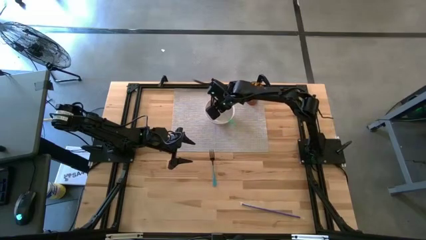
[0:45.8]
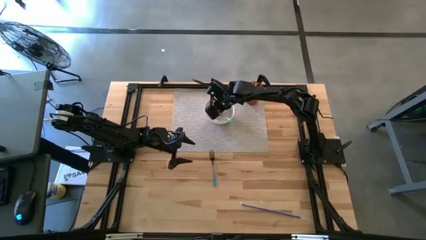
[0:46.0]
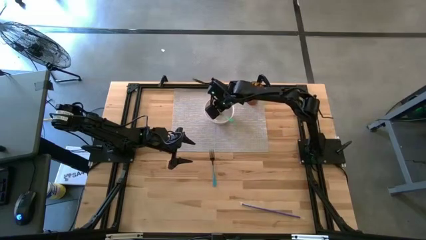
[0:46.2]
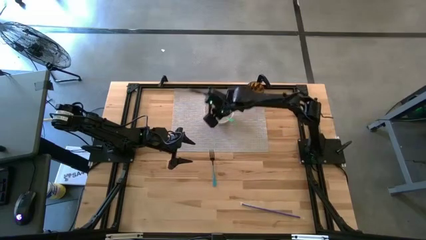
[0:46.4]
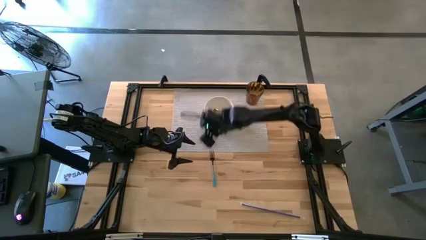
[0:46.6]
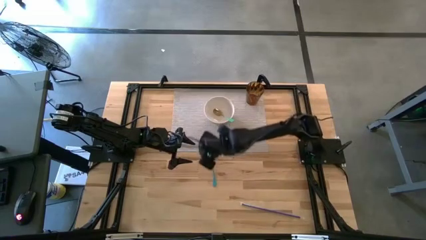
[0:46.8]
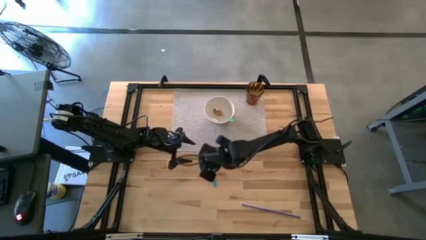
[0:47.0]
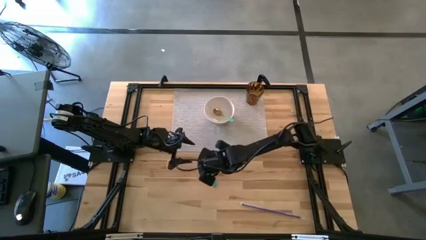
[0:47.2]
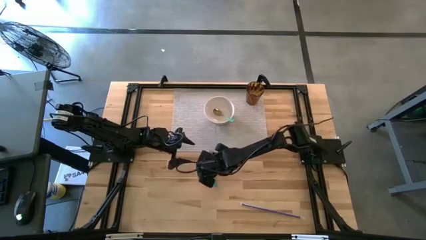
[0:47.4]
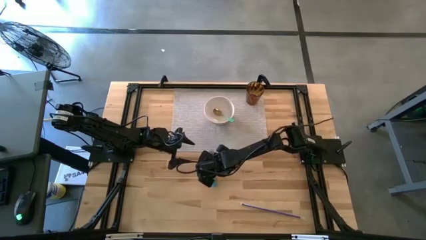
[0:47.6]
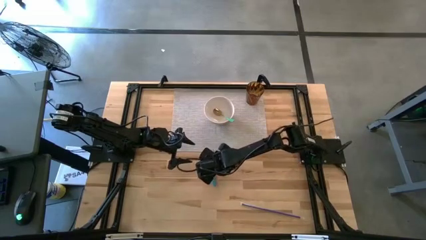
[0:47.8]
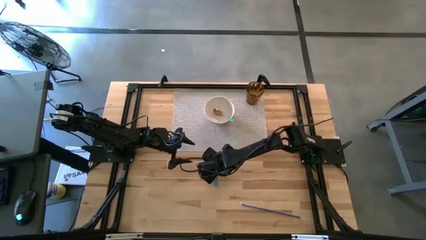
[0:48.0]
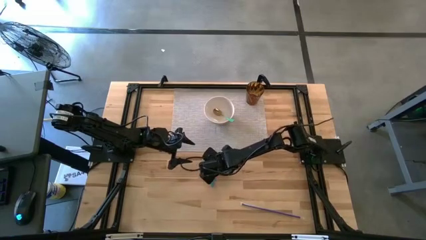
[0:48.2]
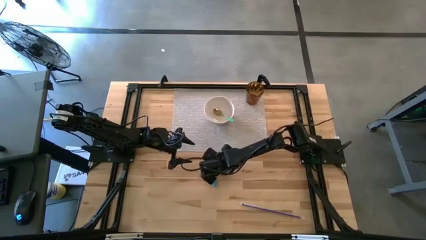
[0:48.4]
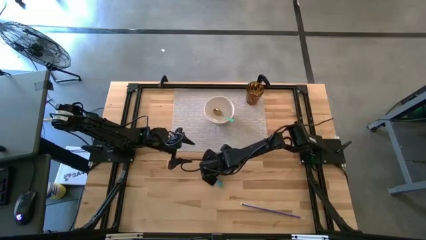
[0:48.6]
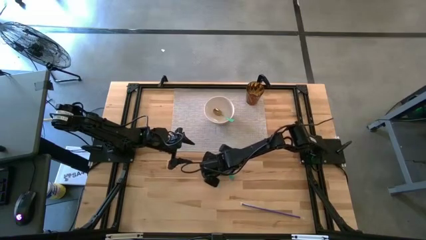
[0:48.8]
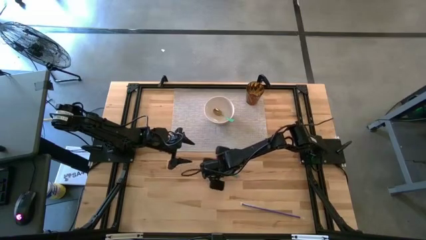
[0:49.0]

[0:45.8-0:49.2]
Task: Pick & Place Utensil
Put the blue fork into the white bowl on the gray mat

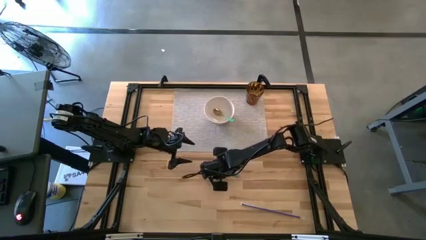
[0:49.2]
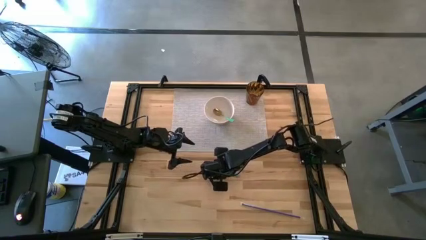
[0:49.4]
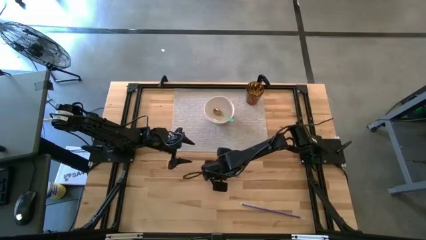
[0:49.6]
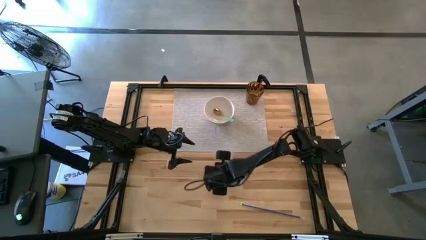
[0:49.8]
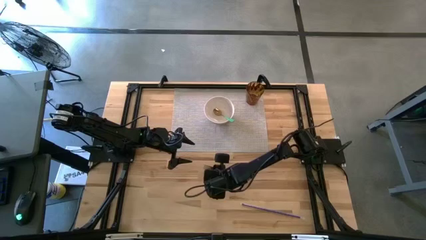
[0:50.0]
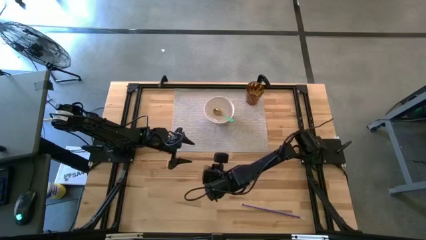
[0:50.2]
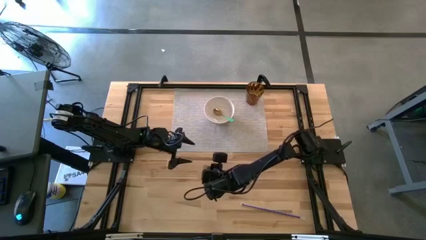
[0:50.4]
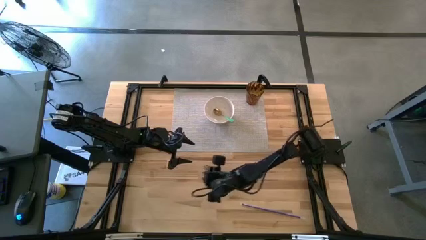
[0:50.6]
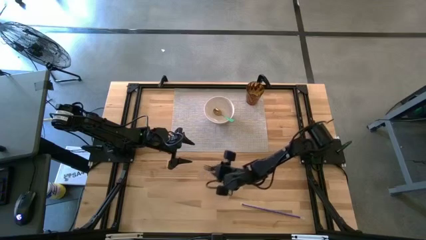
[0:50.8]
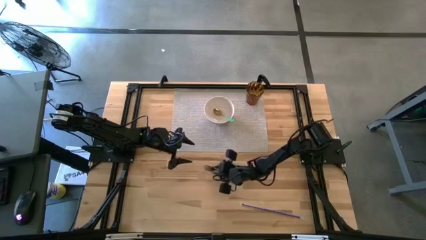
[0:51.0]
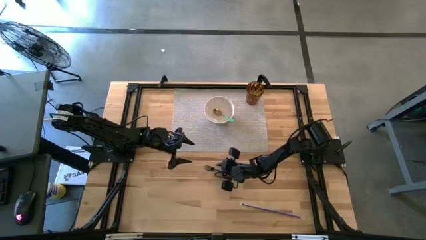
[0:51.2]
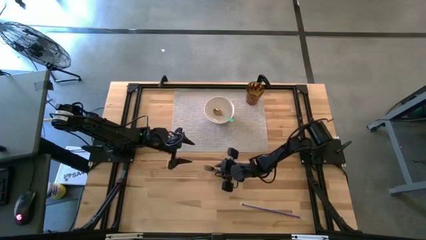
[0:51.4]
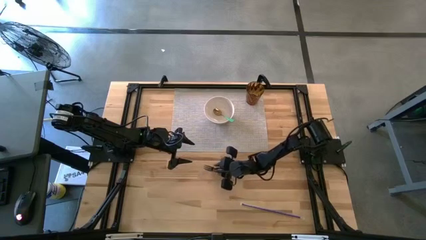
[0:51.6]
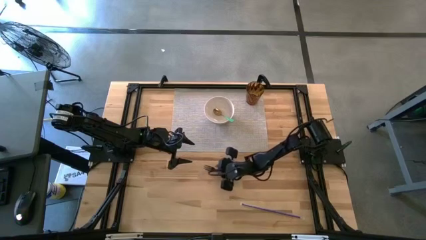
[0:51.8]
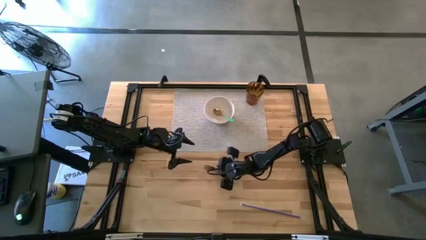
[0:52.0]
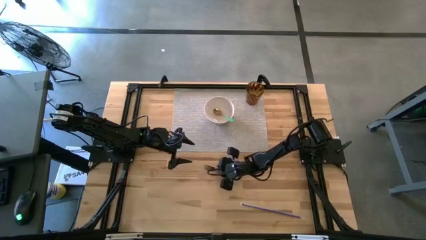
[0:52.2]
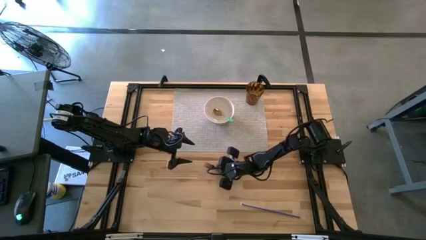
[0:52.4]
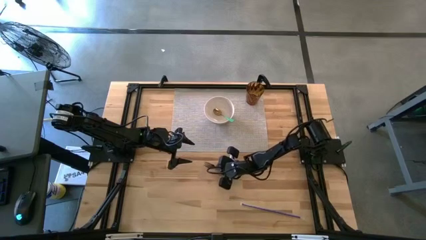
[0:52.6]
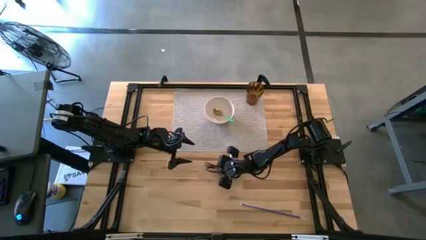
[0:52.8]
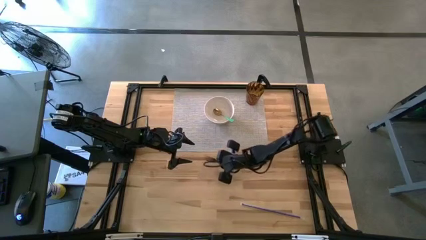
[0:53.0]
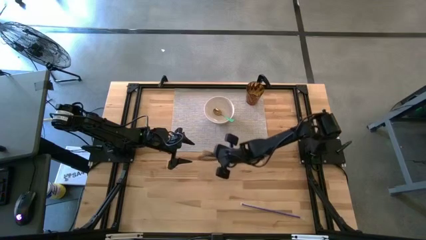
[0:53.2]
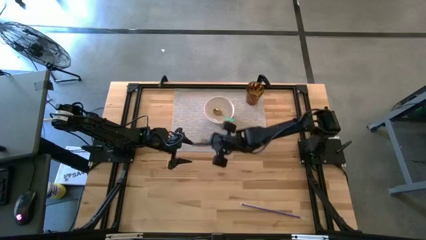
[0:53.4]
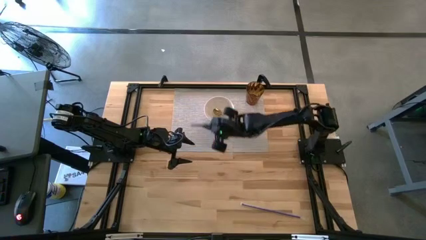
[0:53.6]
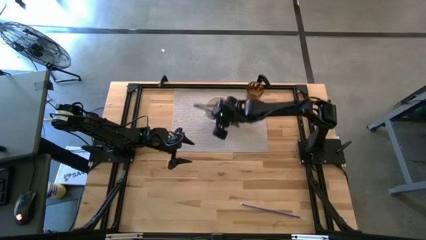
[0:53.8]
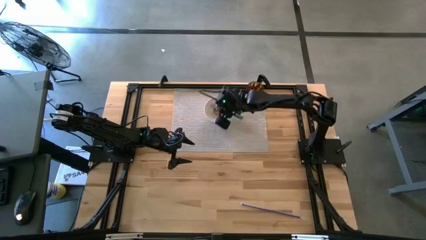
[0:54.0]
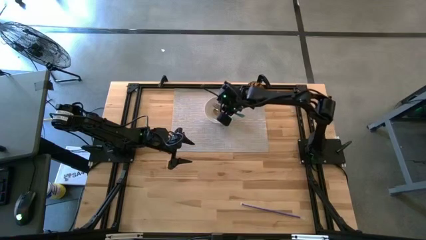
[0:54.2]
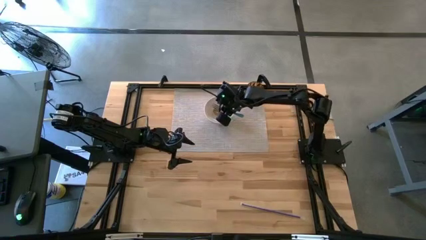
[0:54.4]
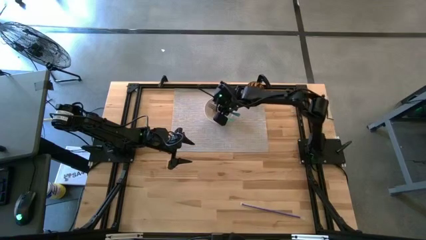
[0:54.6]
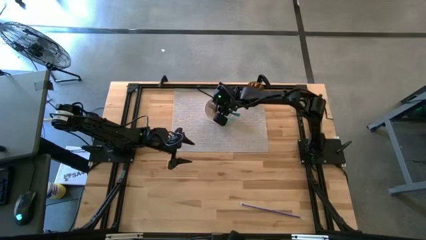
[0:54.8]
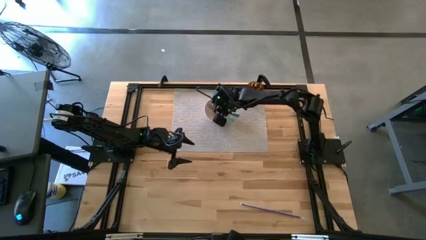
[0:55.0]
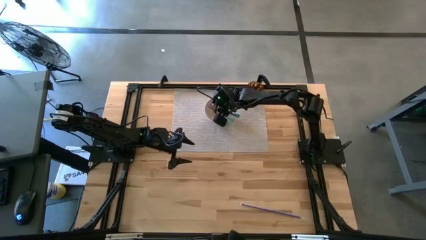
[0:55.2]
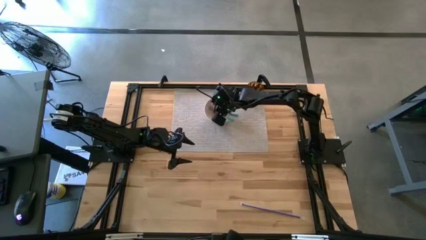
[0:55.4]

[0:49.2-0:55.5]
Put the blue fork into the white bowl on the gray mat

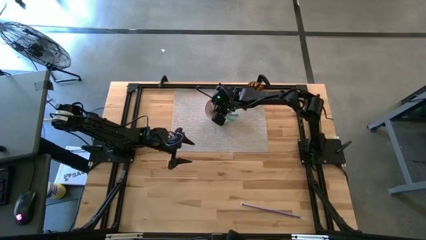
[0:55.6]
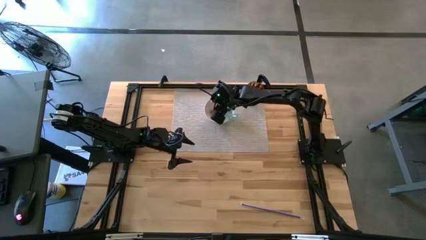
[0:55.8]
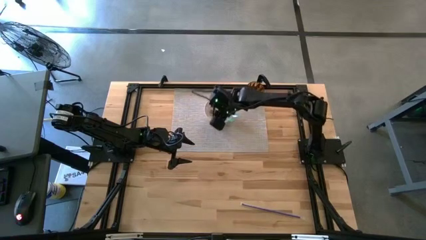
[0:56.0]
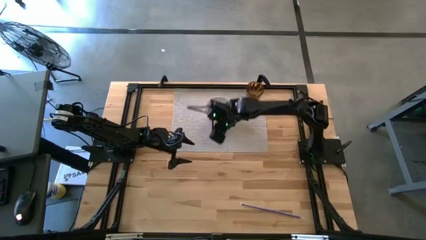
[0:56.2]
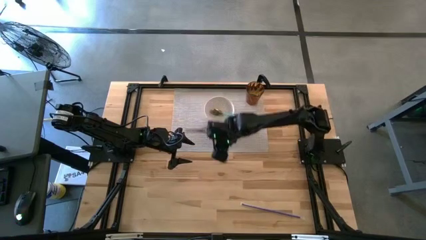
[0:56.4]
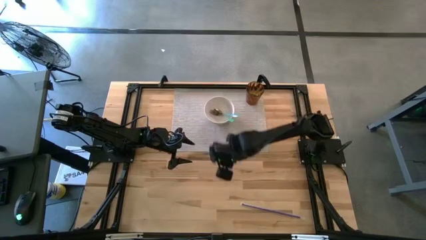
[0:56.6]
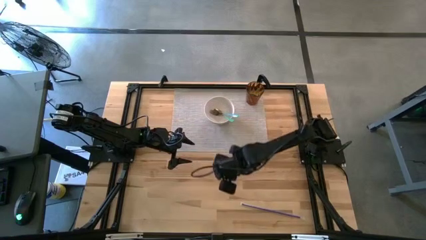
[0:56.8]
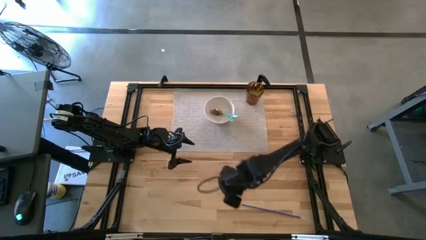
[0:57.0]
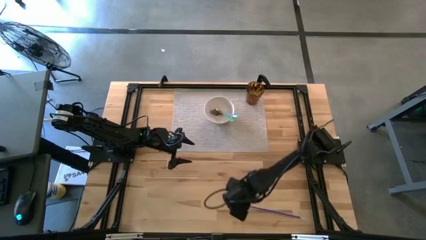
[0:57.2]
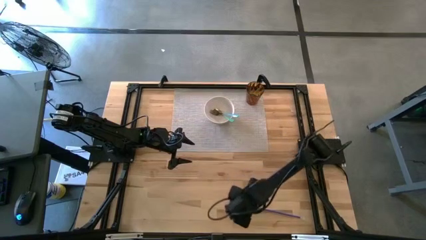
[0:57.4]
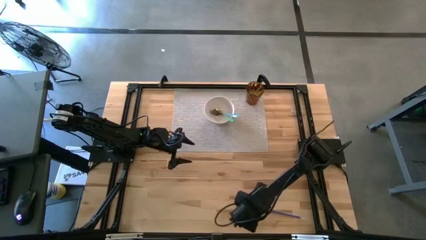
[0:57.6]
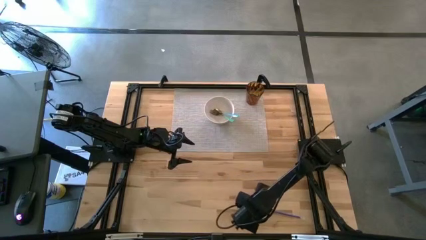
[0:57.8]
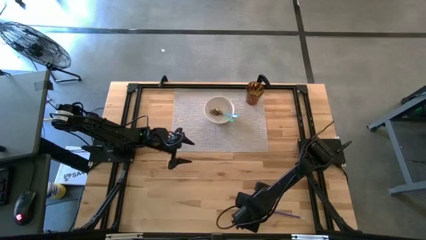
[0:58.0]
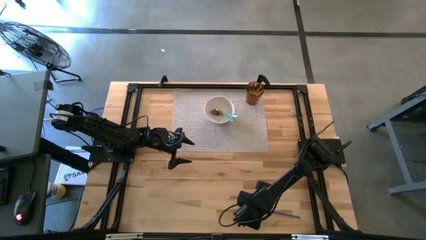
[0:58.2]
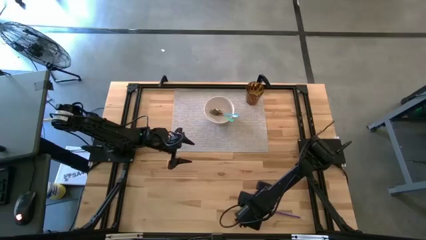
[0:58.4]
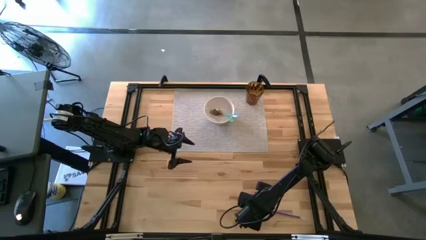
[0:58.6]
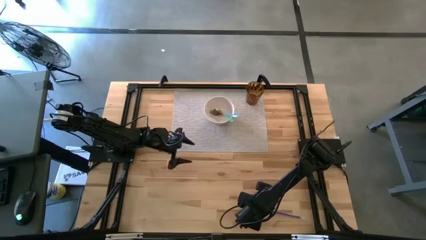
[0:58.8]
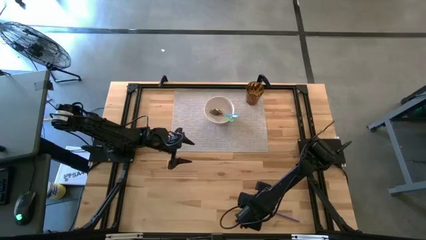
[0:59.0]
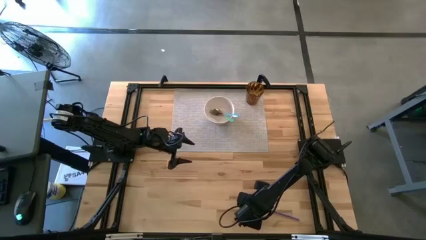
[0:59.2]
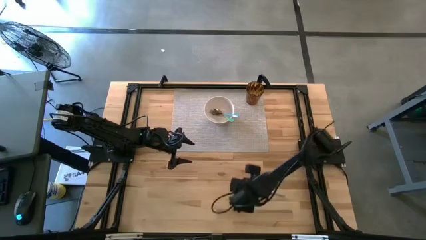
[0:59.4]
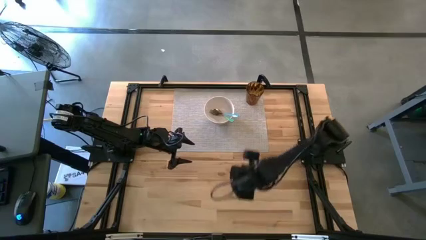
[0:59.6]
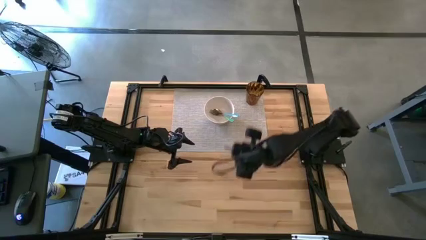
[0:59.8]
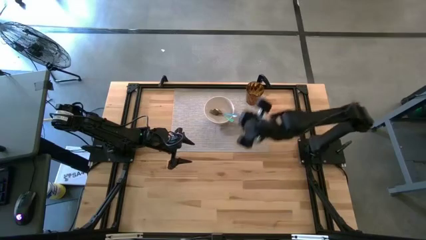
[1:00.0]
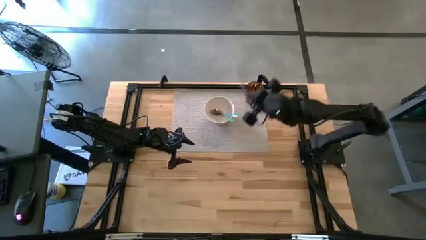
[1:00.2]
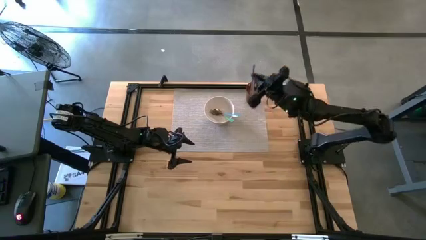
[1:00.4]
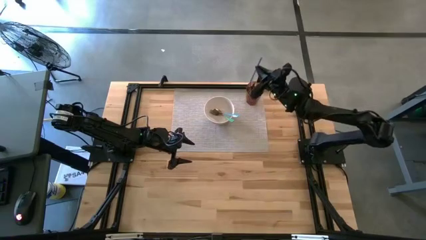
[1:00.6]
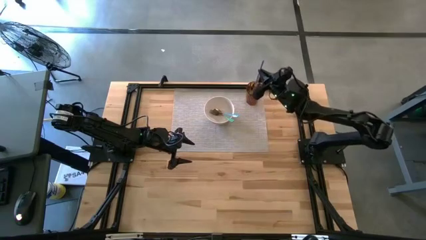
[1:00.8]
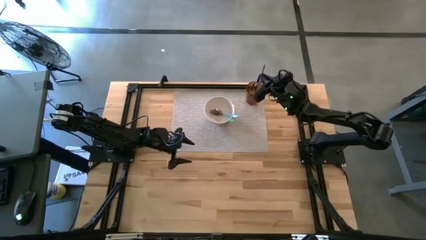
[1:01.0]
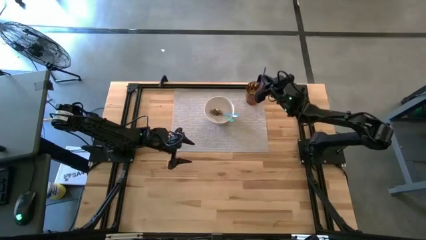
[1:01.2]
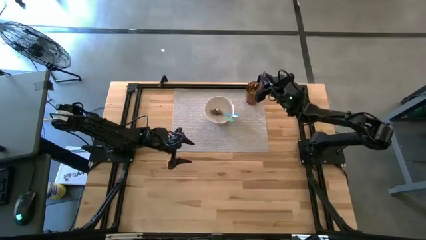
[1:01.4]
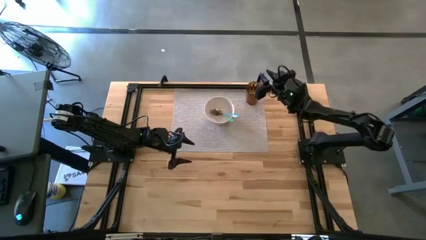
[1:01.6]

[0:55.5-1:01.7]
Put the purple straw into the brown cup on the gray mat
